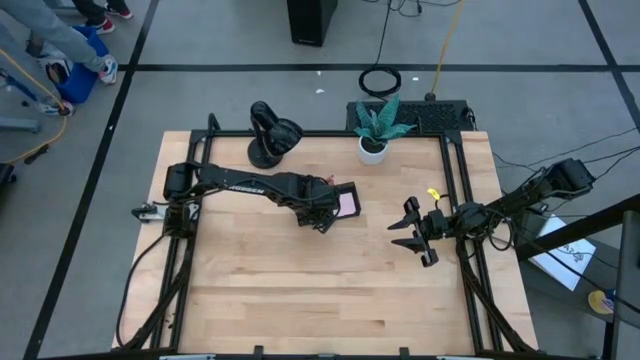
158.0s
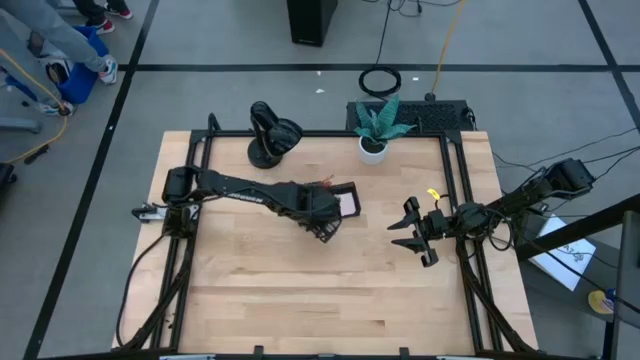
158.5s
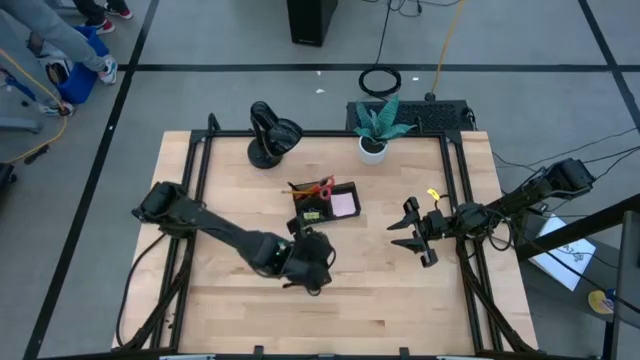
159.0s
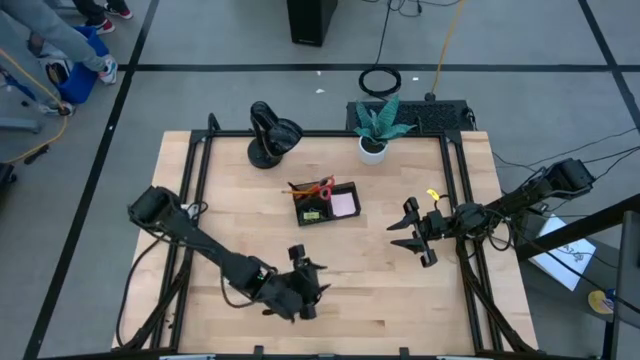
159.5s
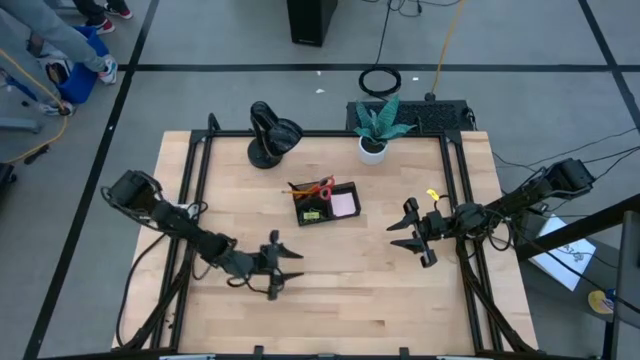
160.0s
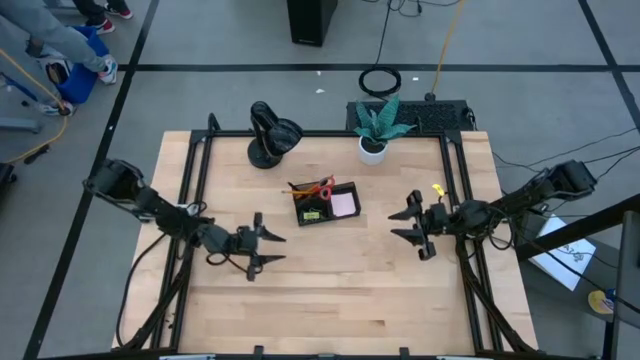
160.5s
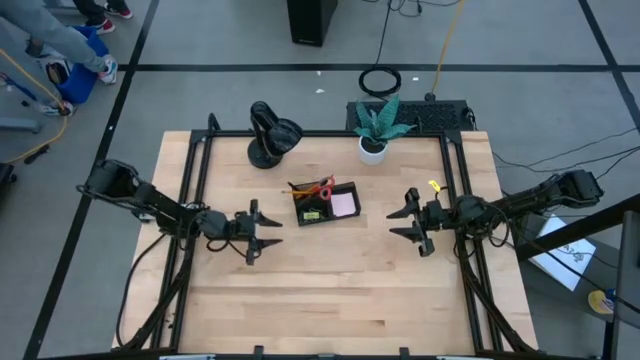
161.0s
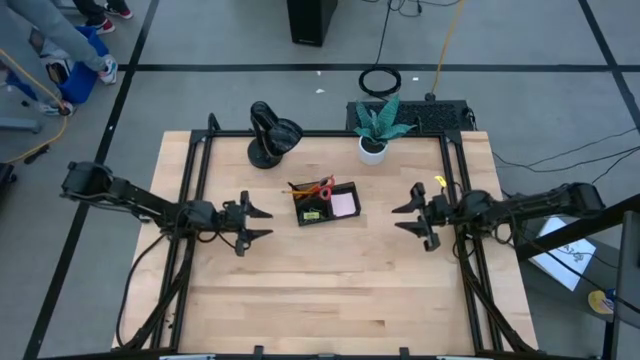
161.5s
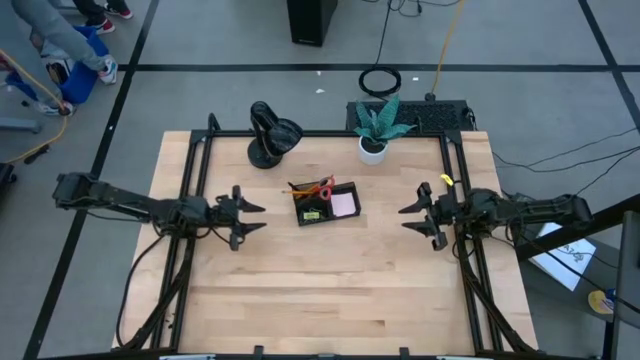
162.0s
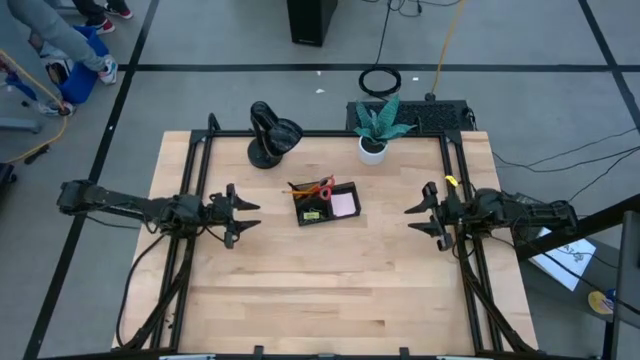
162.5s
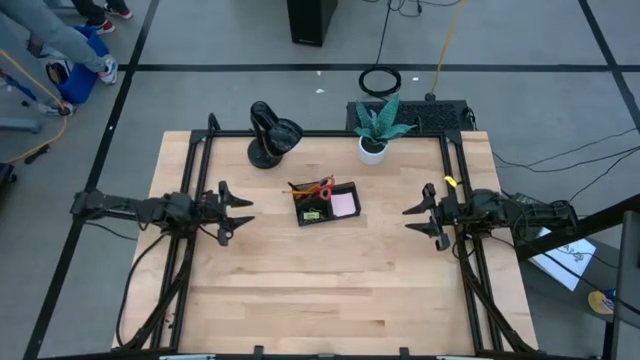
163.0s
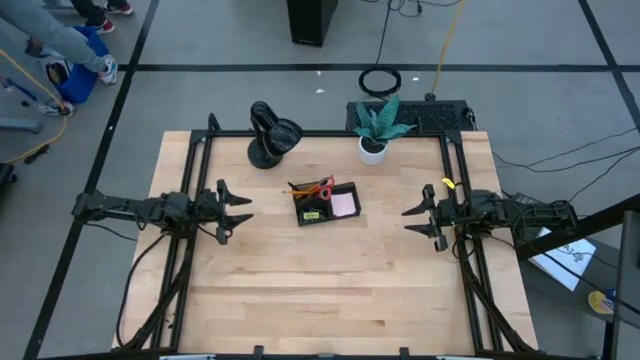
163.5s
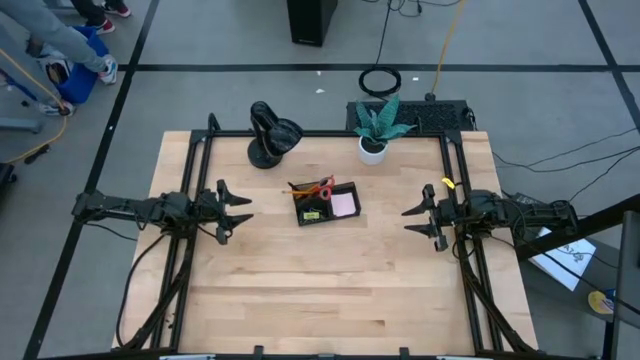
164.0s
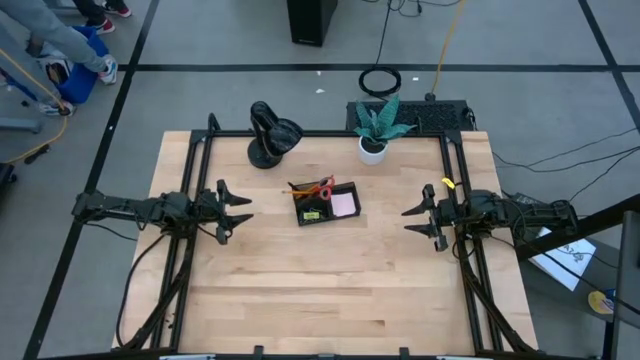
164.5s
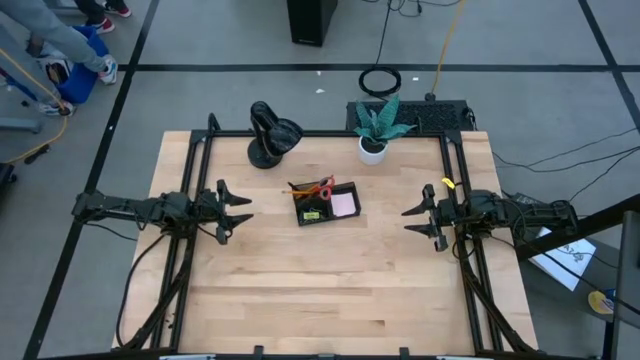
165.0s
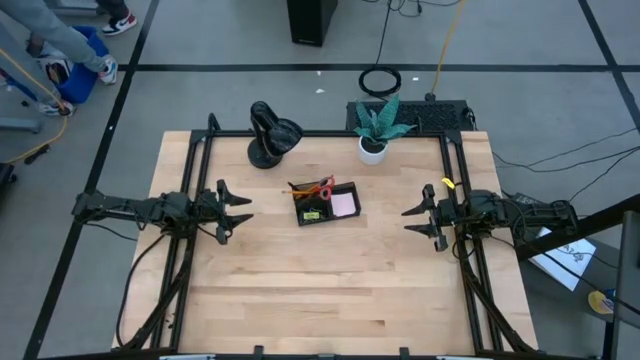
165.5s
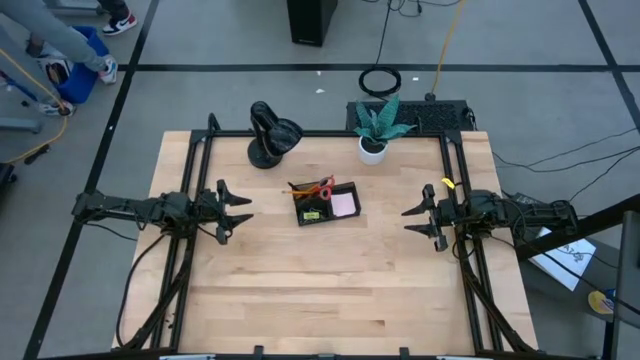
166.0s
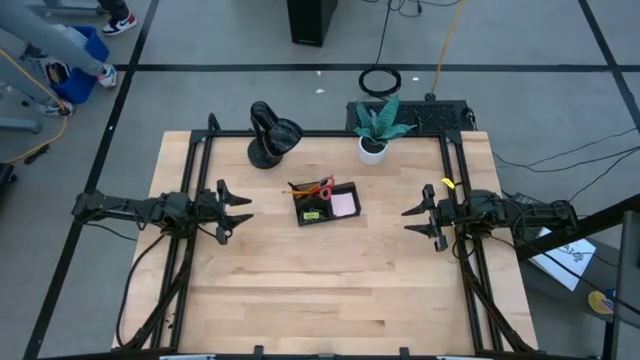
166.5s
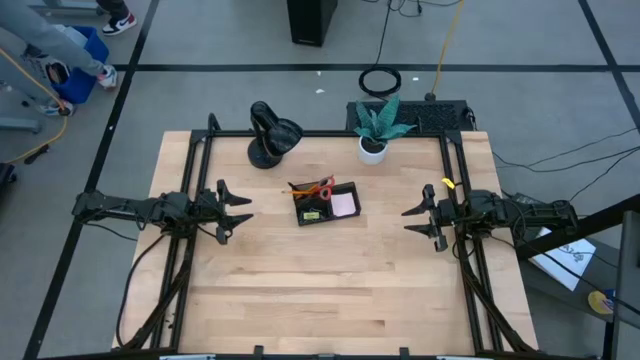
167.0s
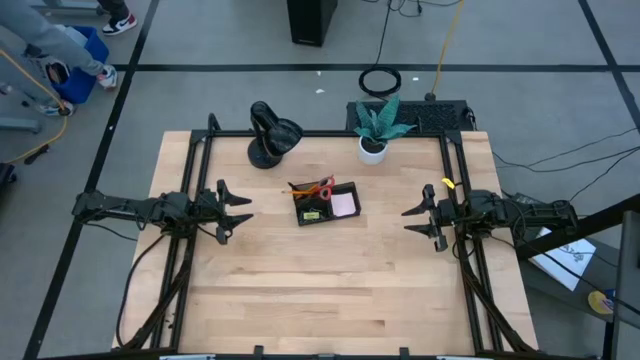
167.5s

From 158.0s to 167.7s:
Task: Pick and place office supplies into organizer
Return to Home Position

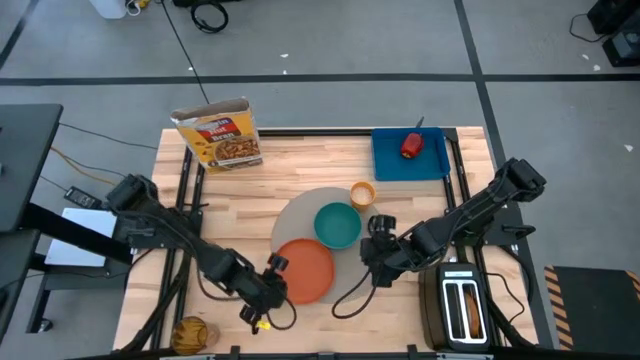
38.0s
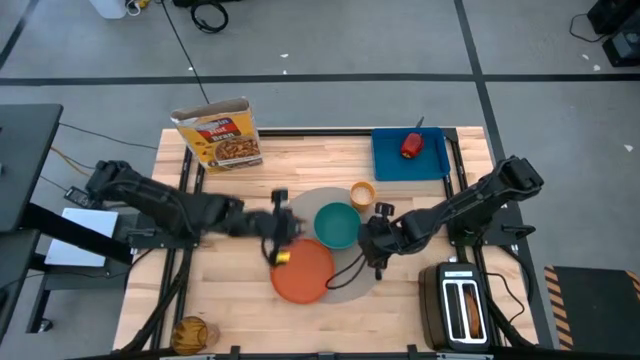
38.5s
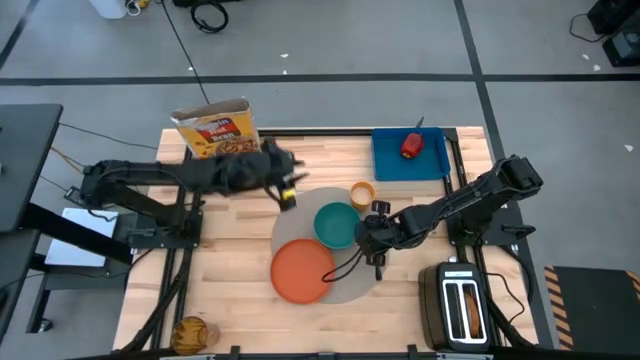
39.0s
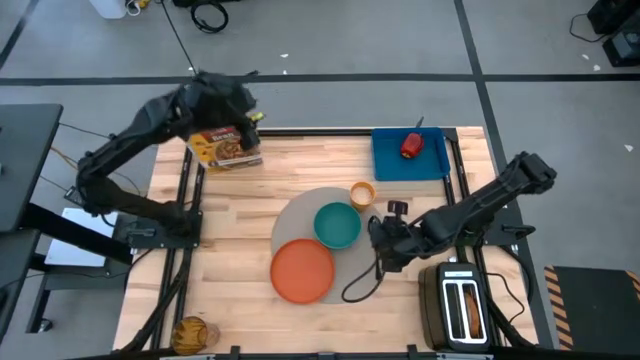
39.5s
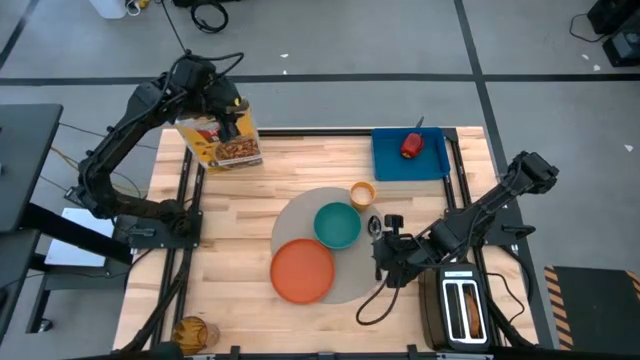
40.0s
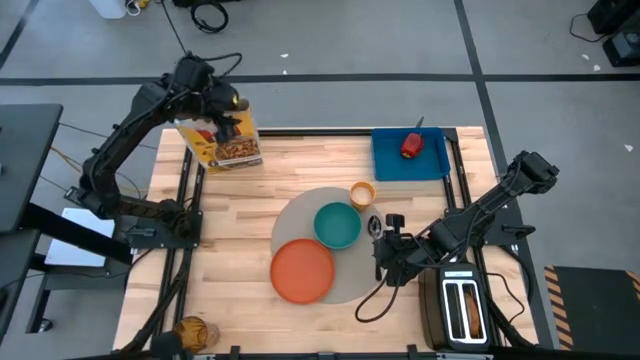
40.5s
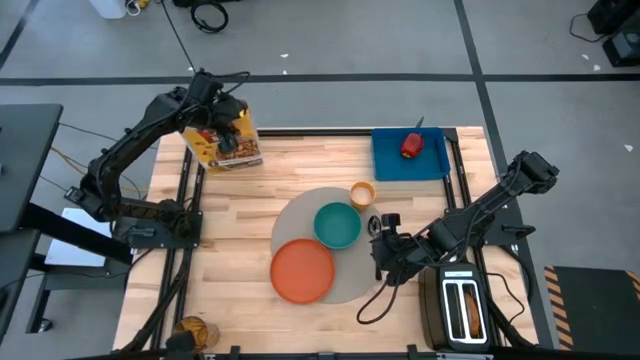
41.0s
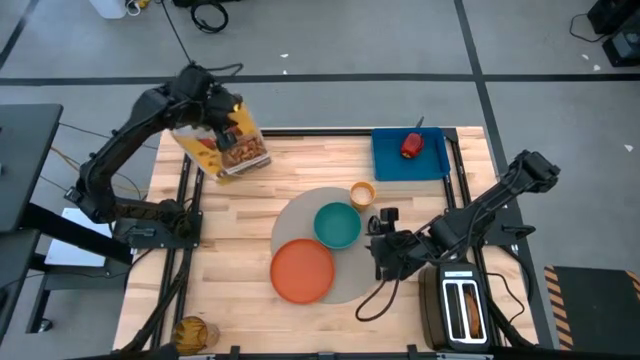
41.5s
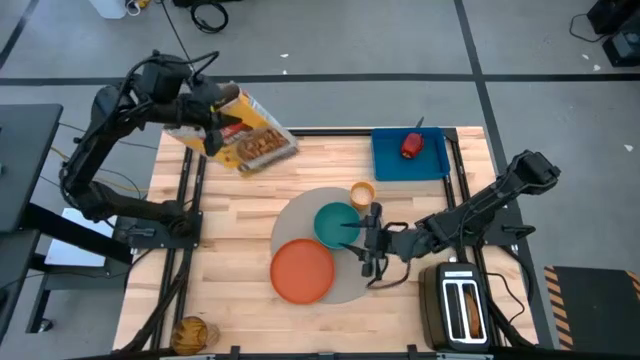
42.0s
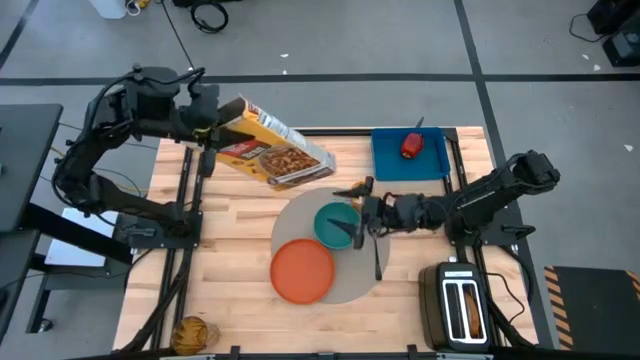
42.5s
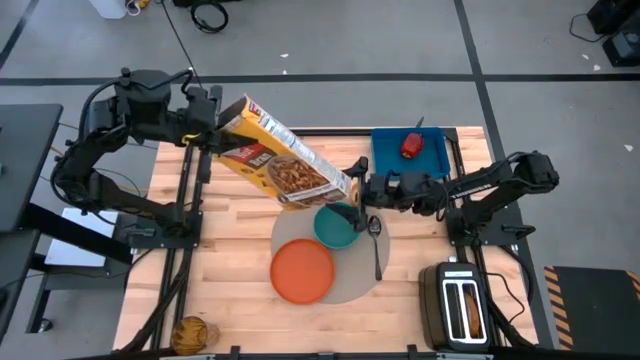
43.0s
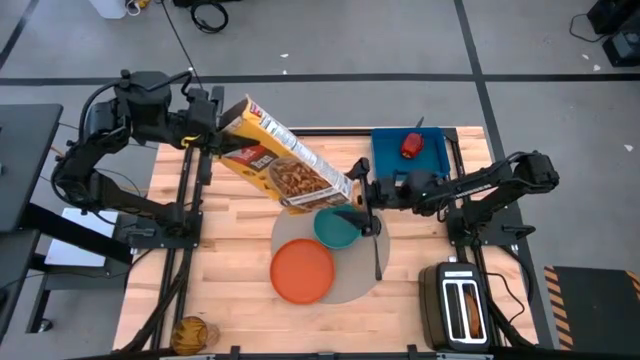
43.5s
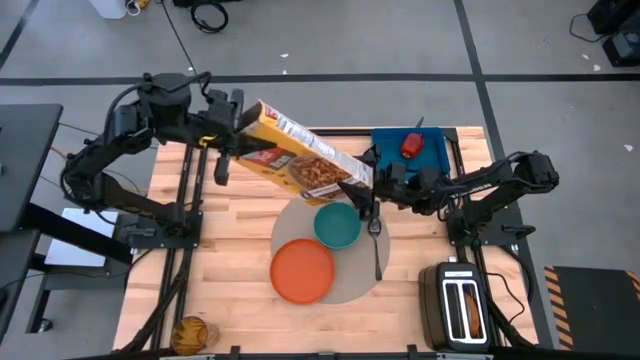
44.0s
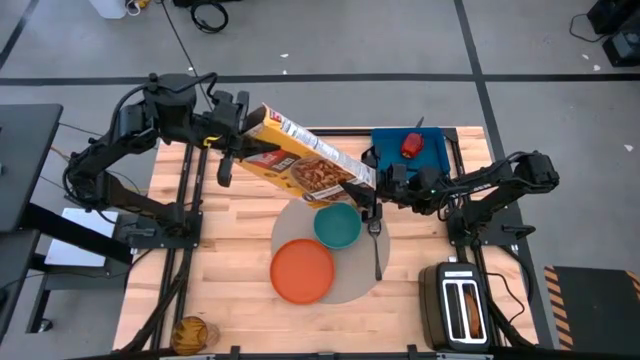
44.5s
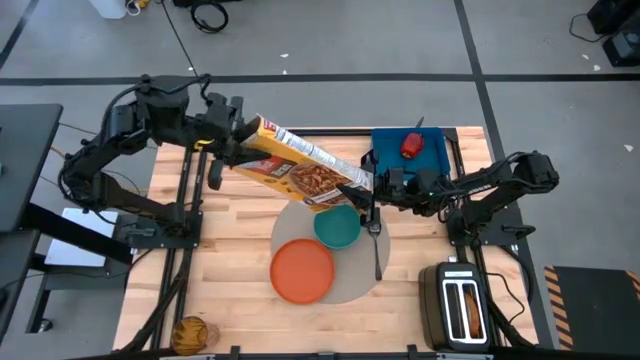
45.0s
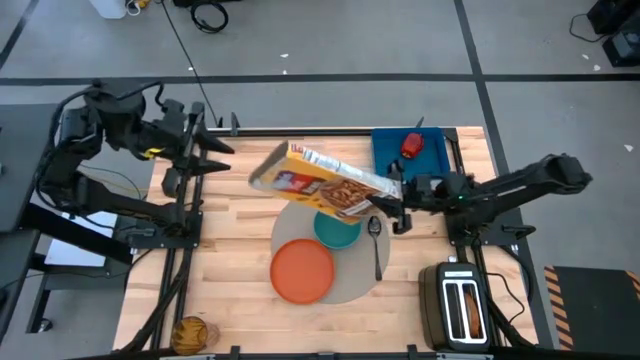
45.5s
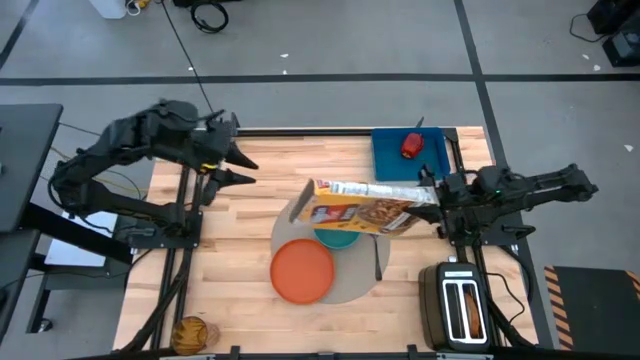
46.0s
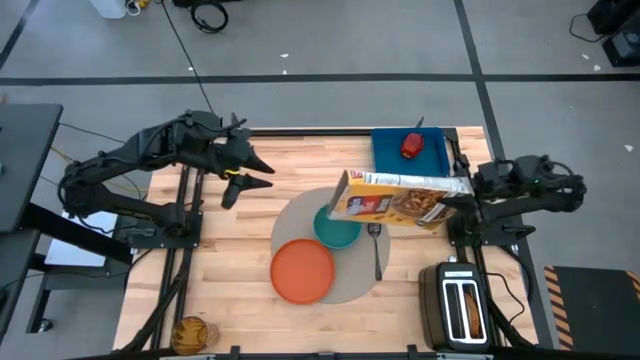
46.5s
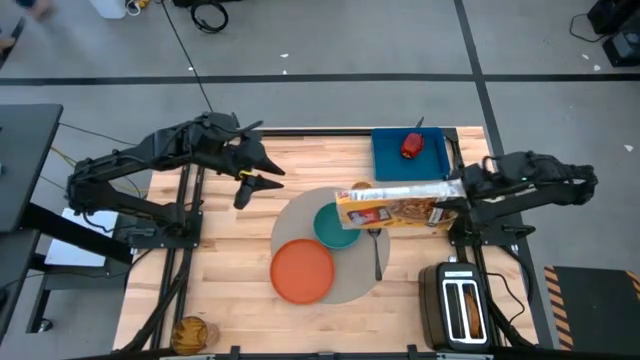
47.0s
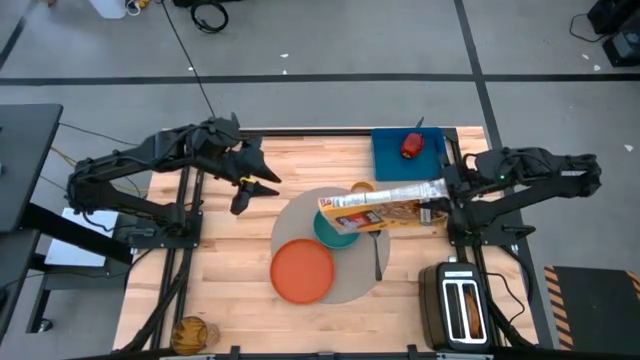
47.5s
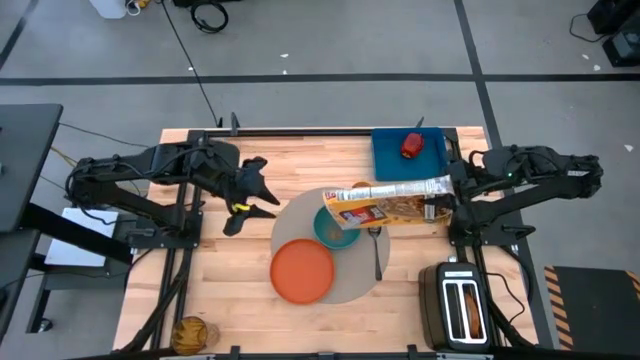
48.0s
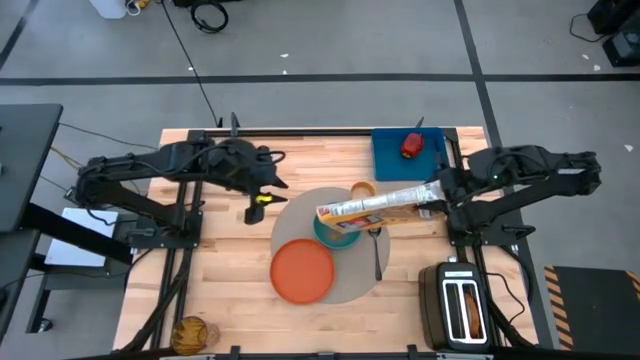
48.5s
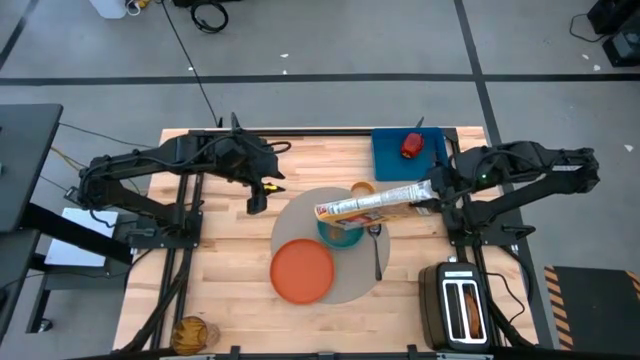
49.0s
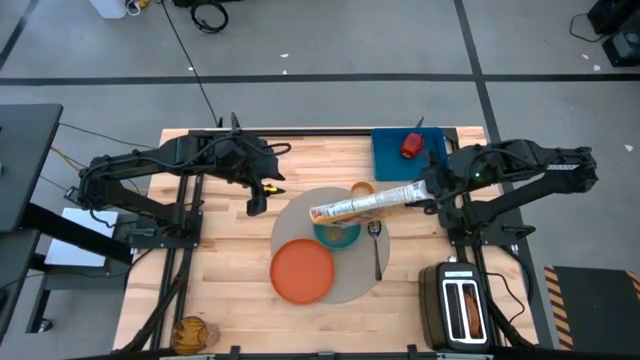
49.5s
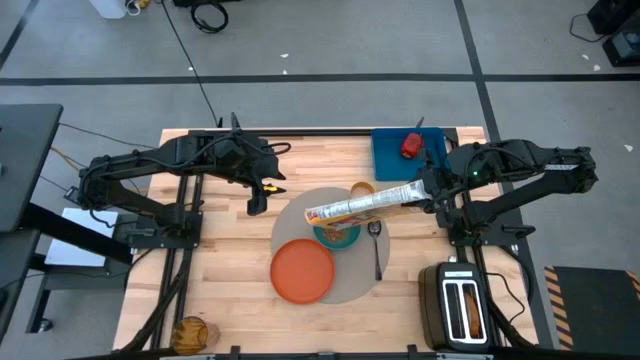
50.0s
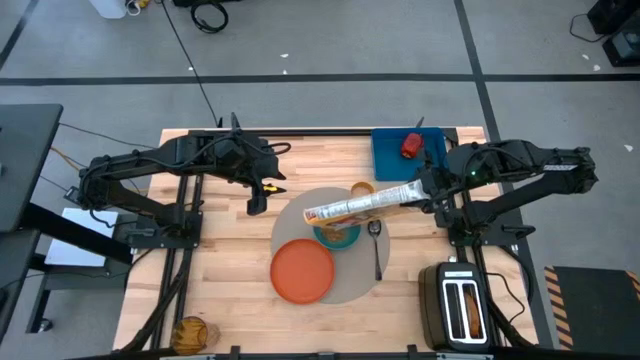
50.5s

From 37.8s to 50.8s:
Task: Arrange a breakfast setting
Pour the cereal from the cereal box into a bowl
